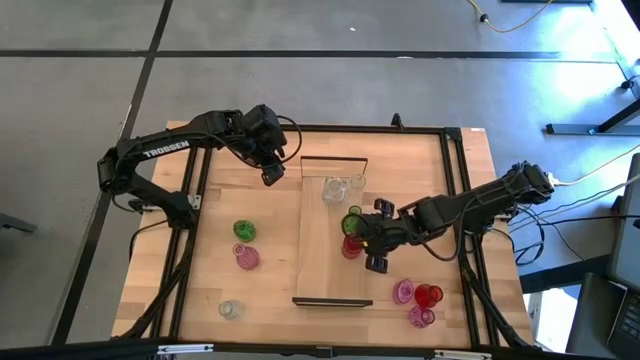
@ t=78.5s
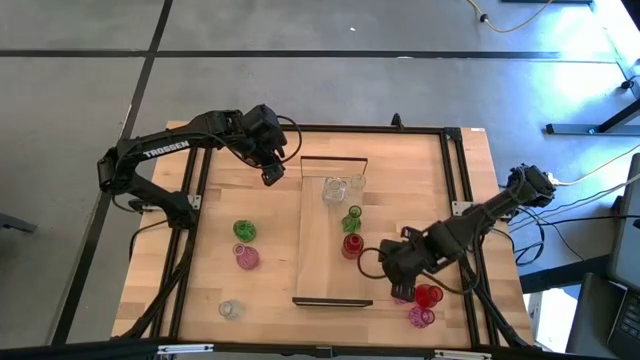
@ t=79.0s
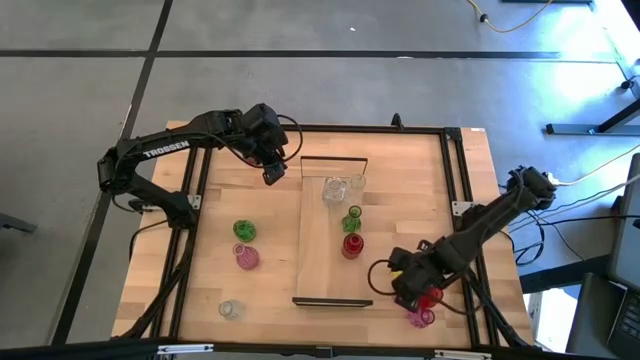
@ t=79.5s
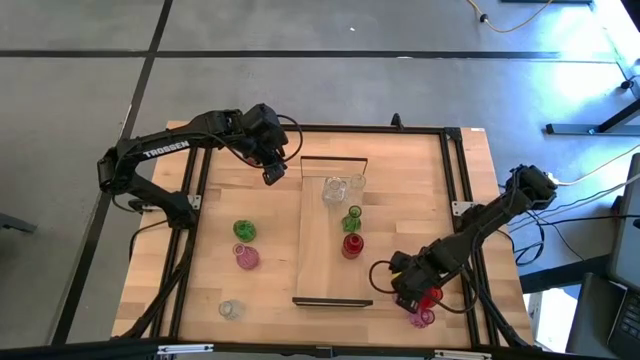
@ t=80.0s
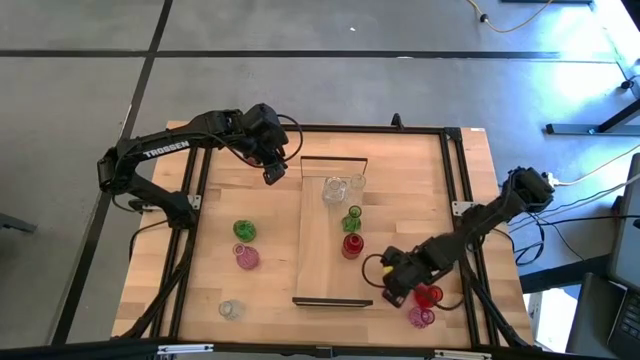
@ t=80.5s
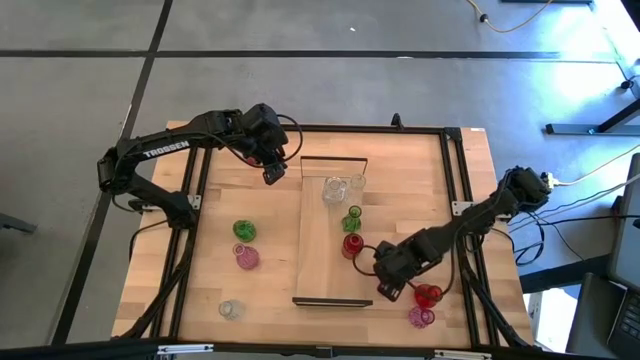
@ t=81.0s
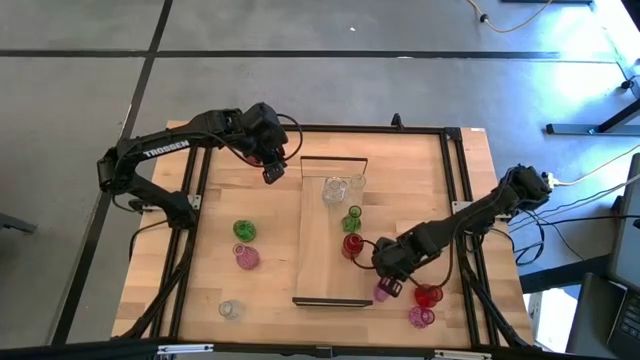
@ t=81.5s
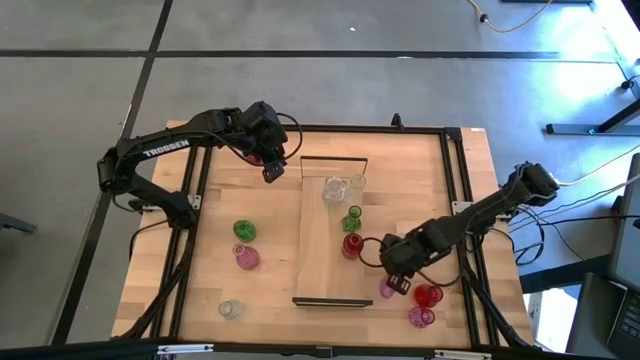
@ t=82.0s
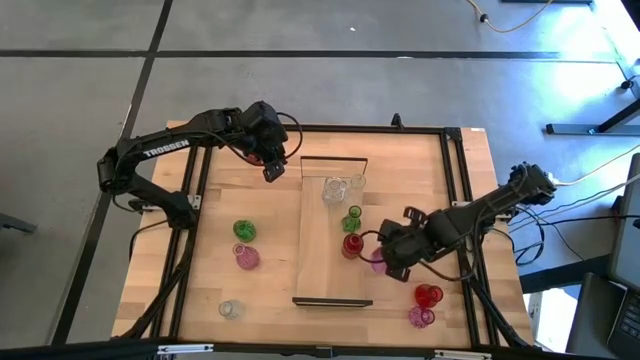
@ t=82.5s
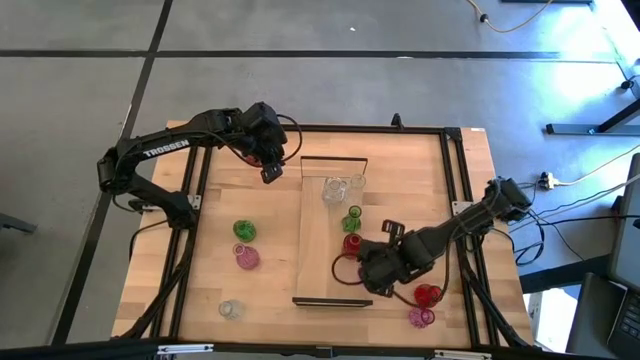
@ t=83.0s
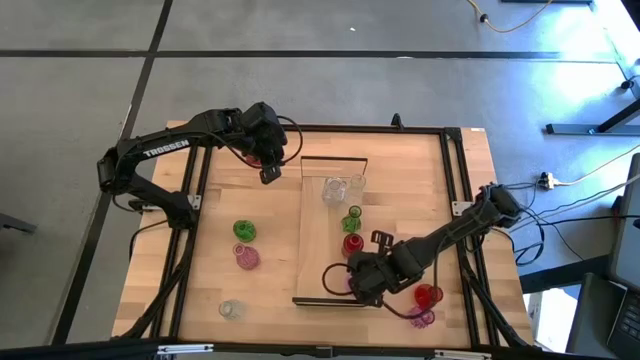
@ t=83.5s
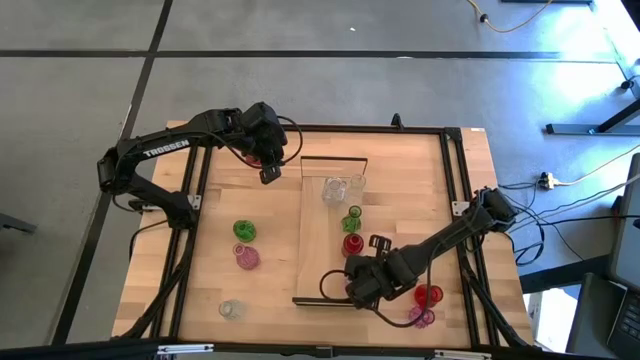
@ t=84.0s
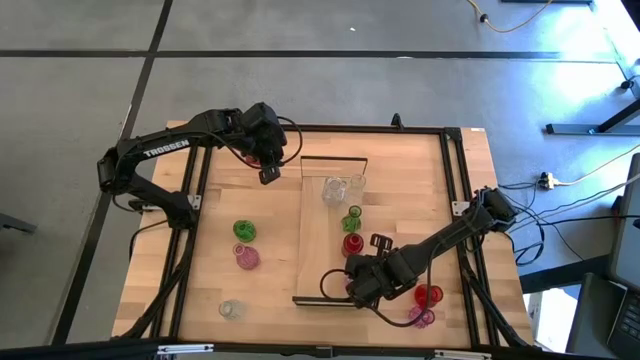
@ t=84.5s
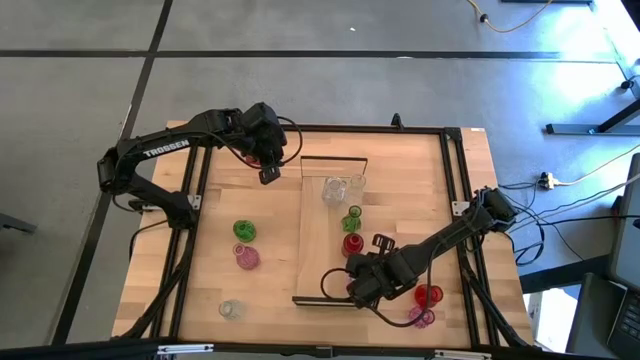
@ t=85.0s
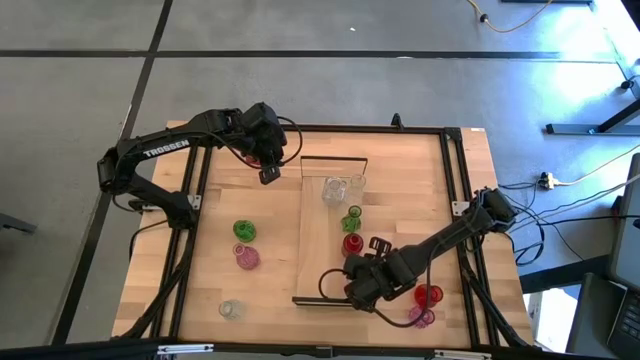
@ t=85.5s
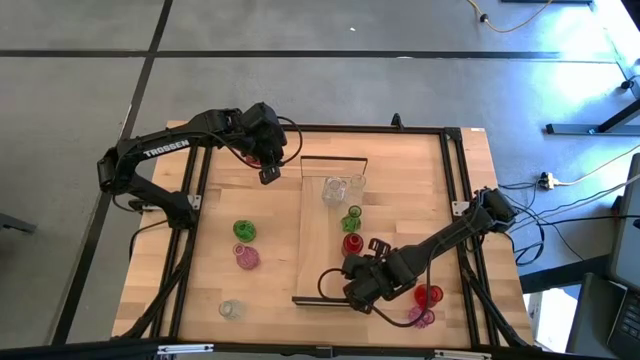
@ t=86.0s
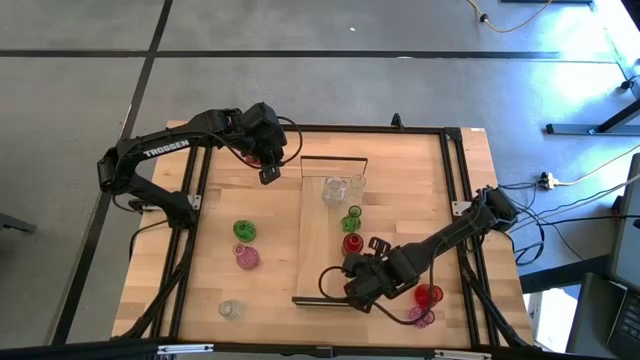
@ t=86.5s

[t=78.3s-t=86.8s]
Task: sort vases onto shelf
Put the top right pink vase on the shelf

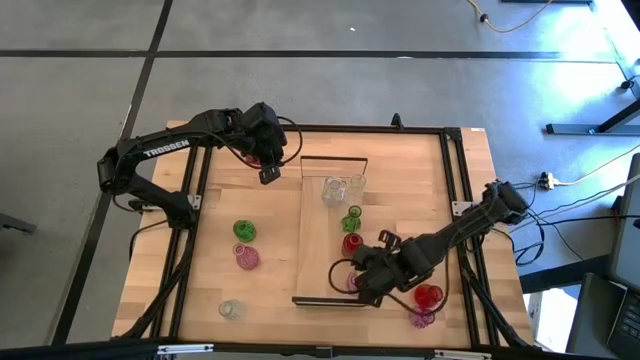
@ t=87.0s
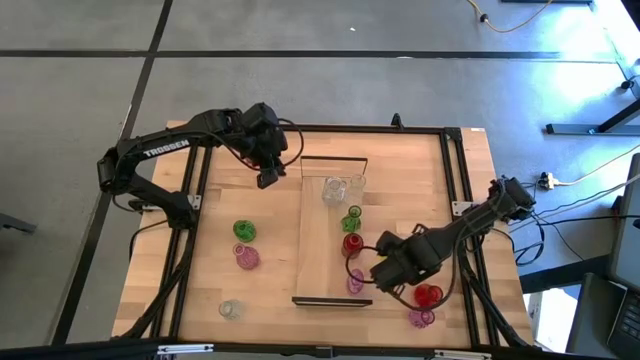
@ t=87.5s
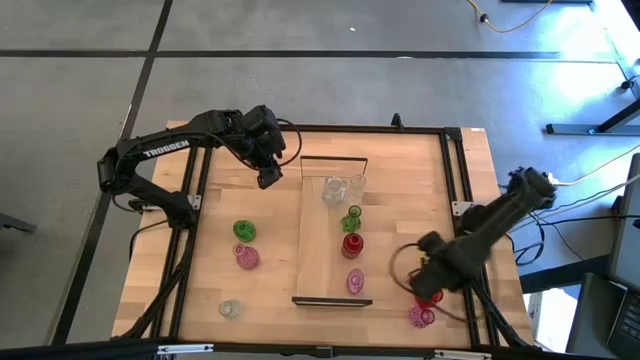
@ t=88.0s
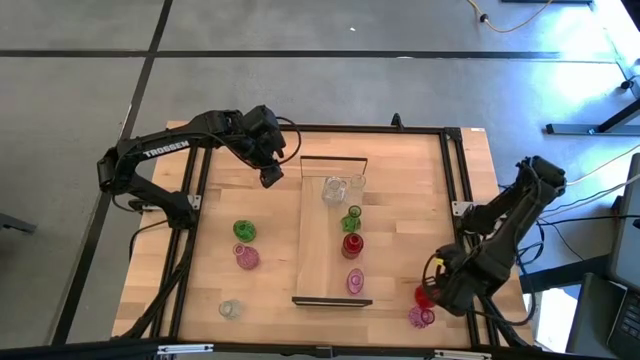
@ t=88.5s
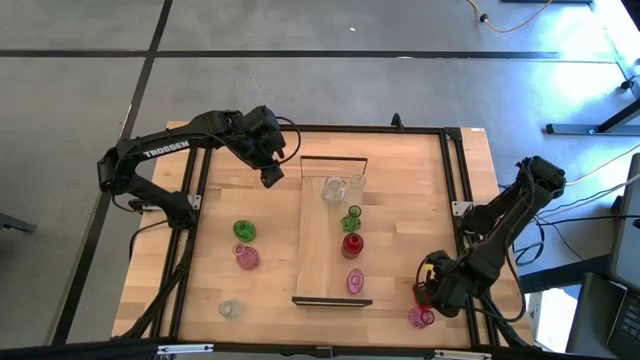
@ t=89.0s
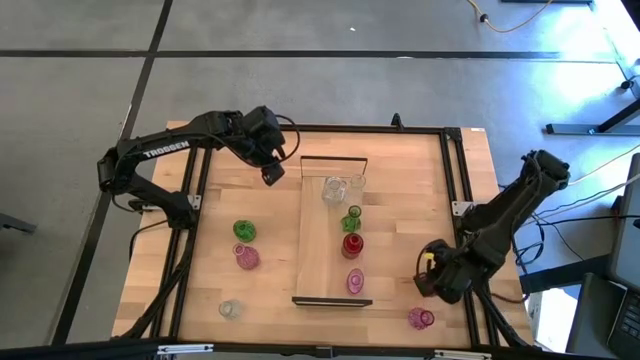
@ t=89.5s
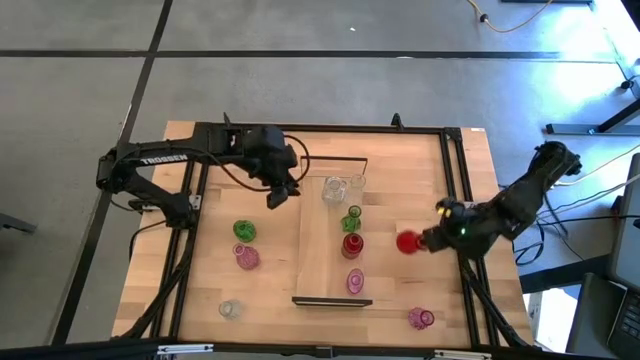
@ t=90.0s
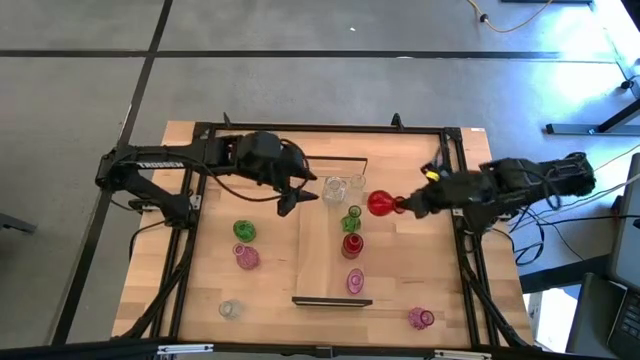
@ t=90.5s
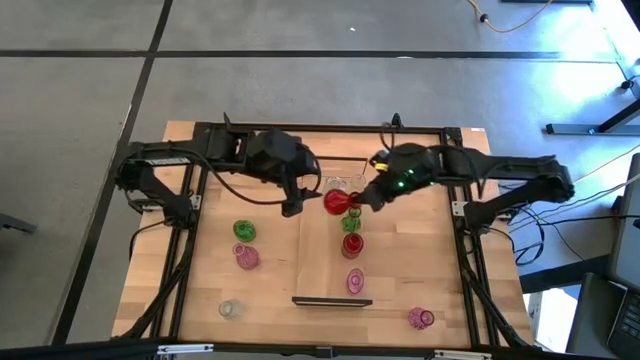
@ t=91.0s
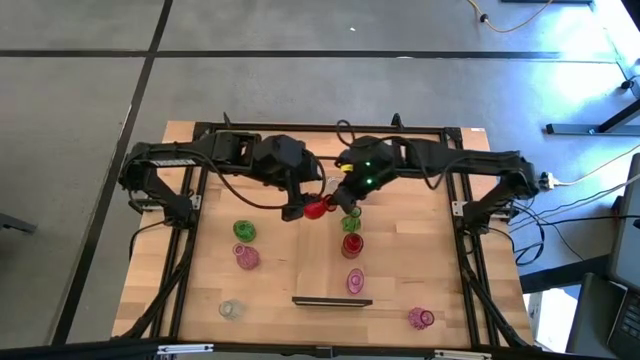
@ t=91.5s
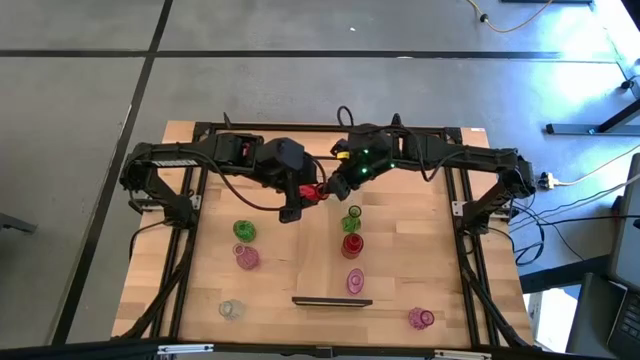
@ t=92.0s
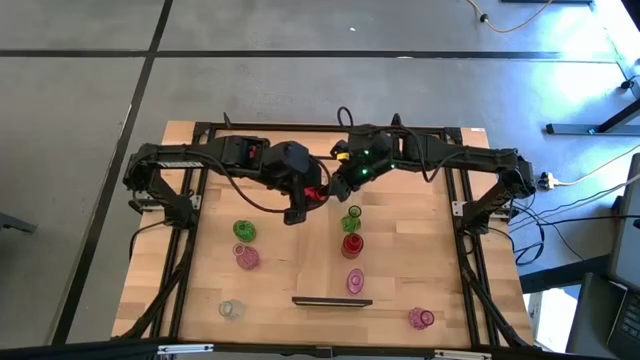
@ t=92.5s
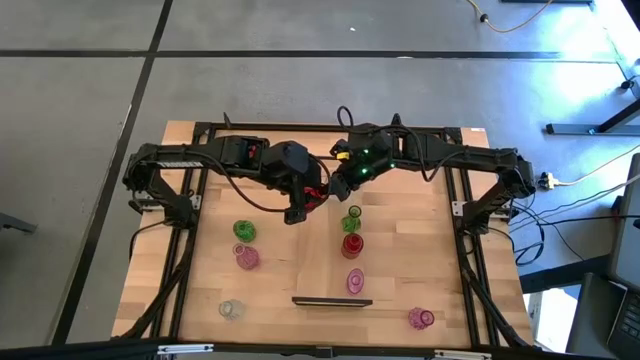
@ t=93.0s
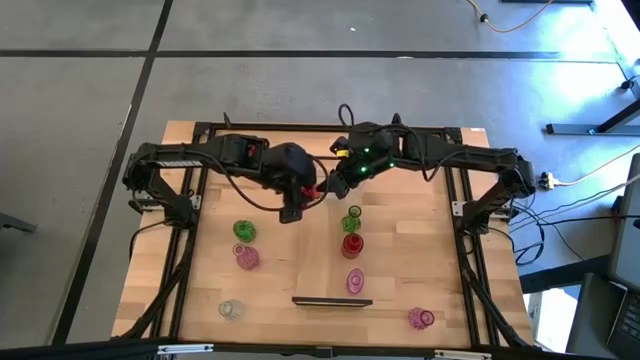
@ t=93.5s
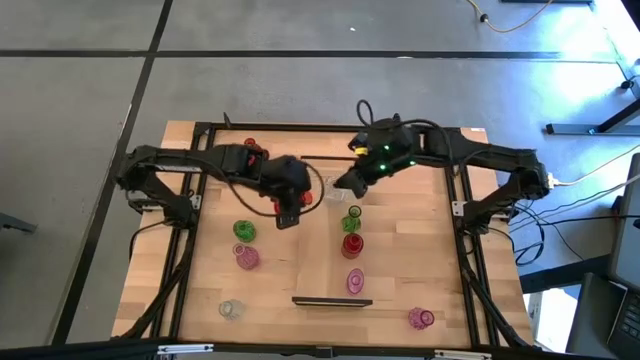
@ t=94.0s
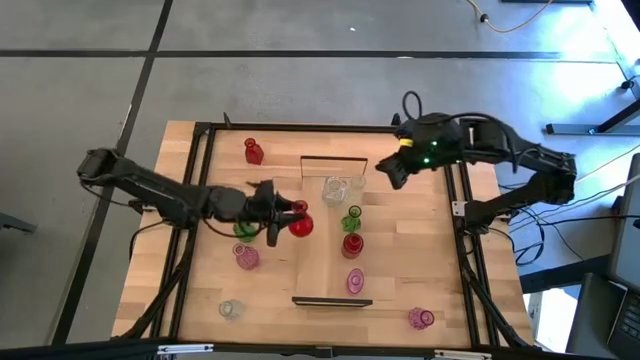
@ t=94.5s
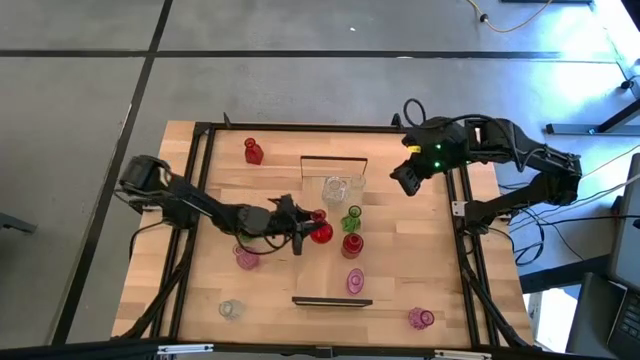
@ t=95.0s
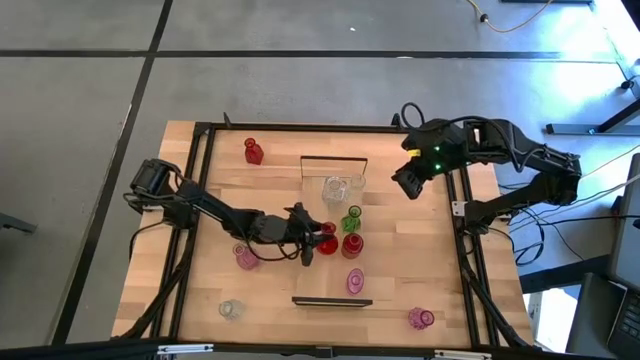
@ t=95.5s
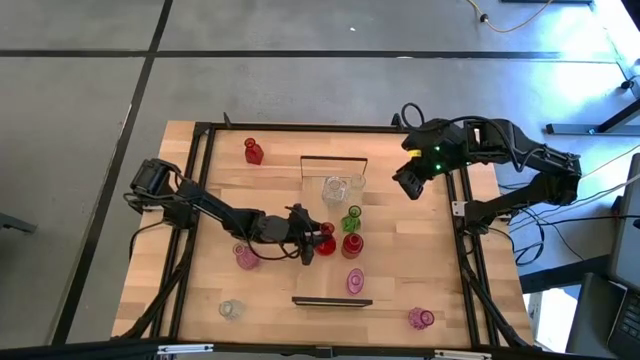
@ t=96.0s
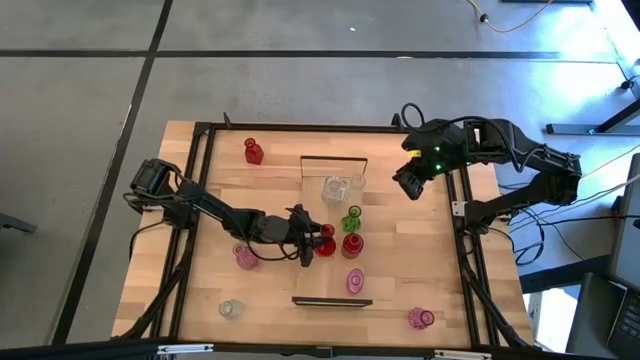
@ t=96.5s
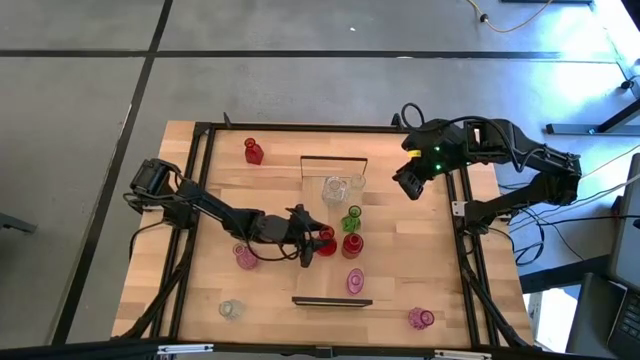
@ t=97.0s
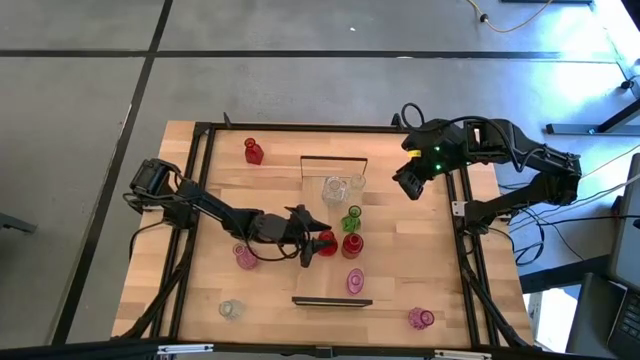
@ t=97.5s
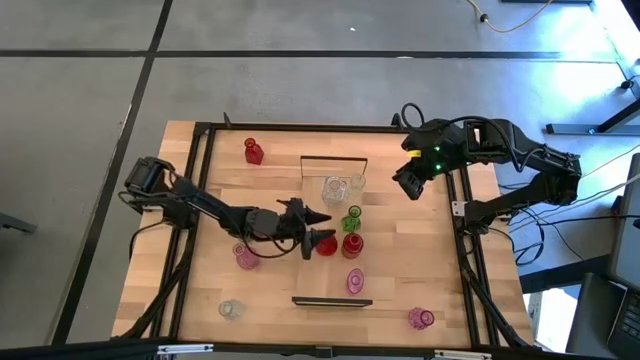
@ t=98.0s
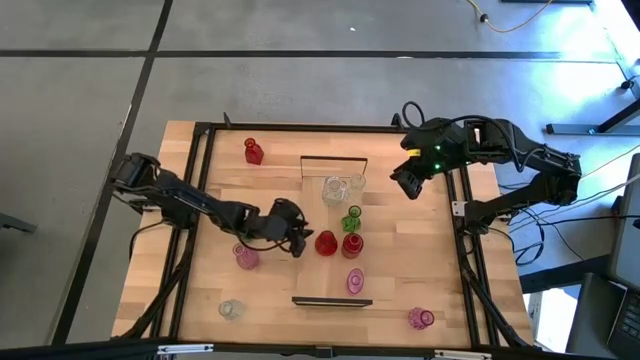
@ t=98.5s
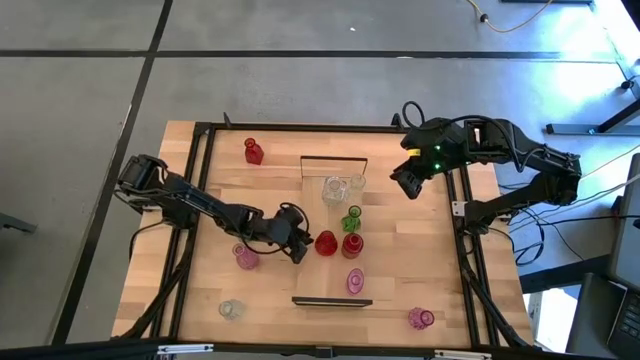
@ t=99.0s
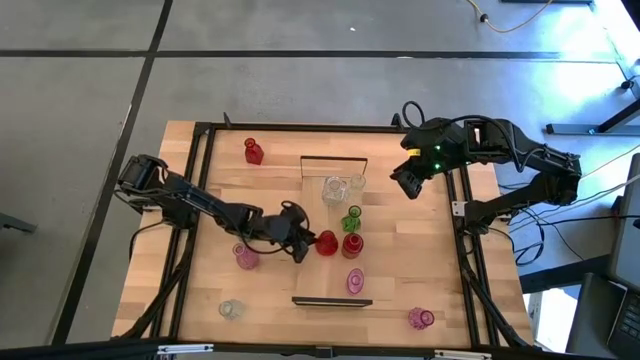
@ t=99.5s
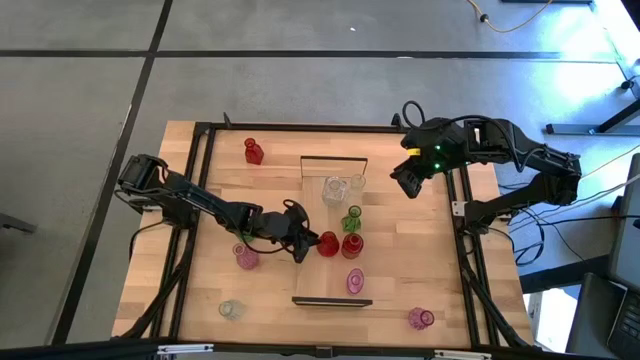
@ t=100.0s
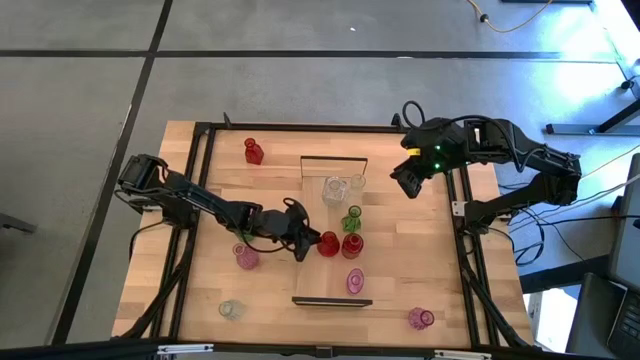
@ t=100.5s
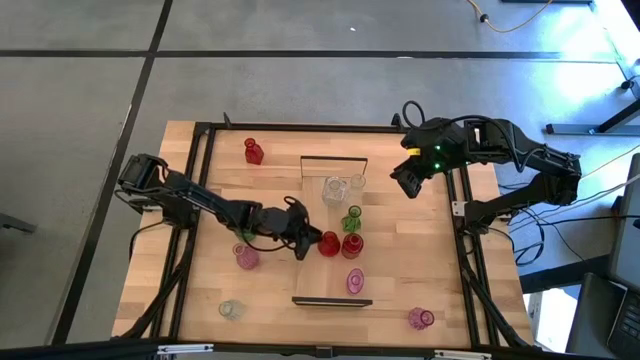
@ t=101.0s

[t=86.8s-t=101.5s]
Put the bottom red vase aligned with the other red vase on the shelf
